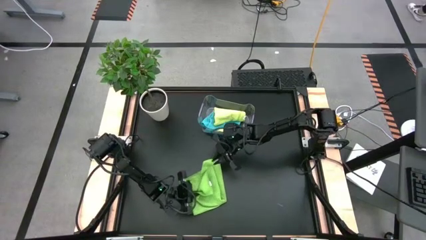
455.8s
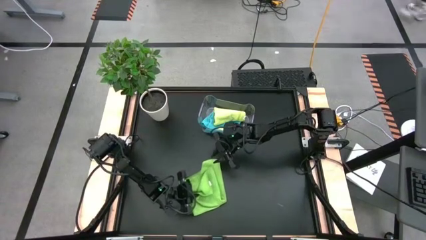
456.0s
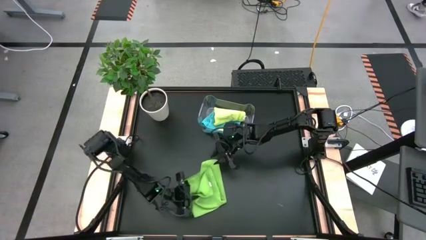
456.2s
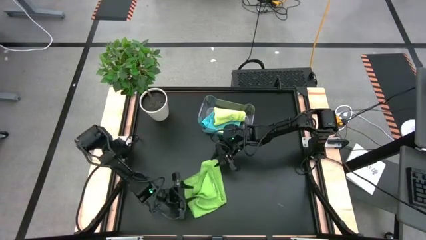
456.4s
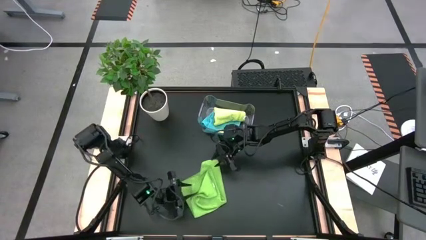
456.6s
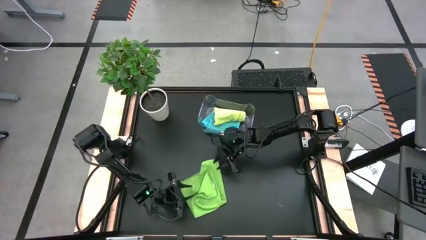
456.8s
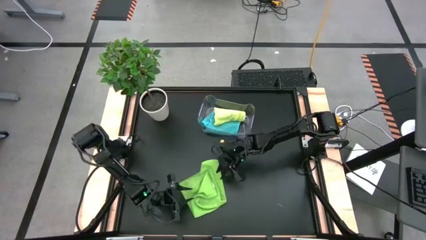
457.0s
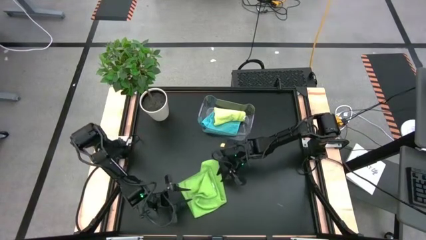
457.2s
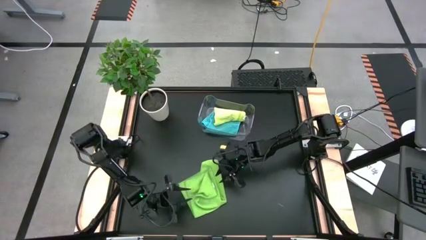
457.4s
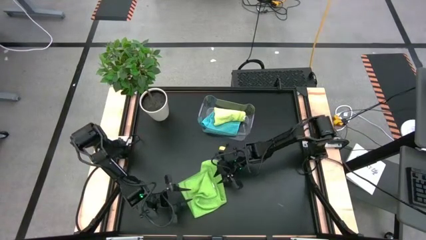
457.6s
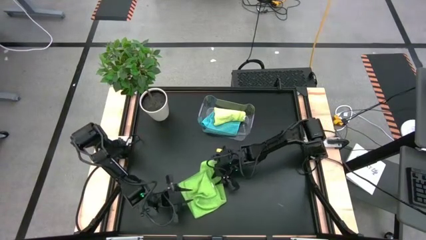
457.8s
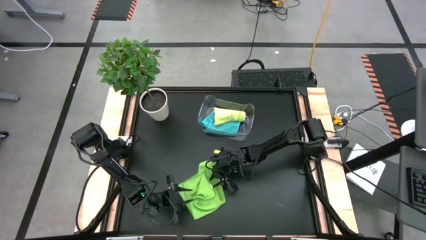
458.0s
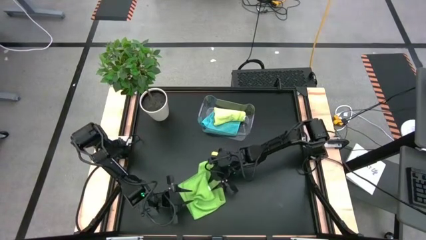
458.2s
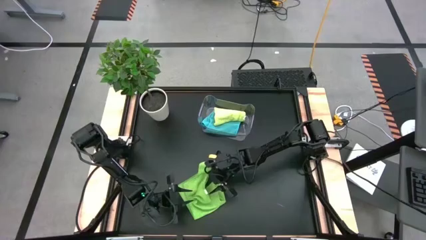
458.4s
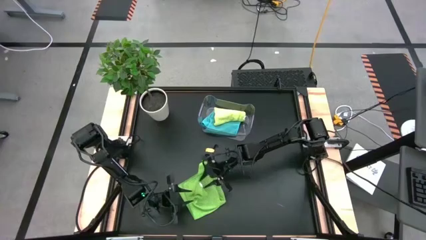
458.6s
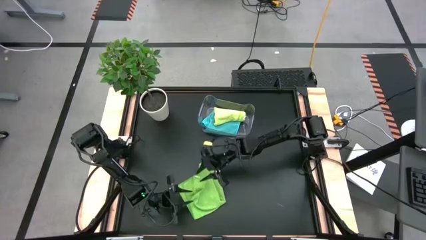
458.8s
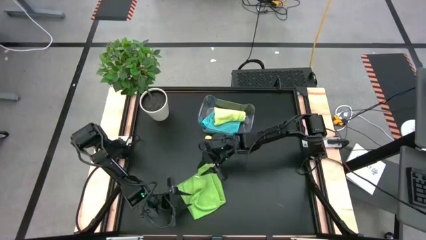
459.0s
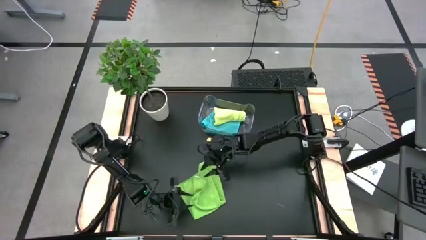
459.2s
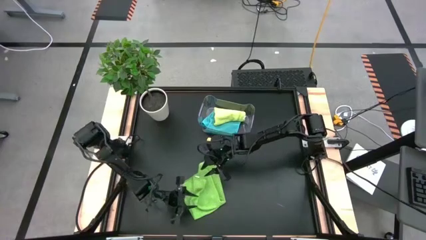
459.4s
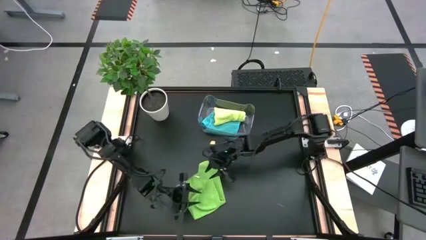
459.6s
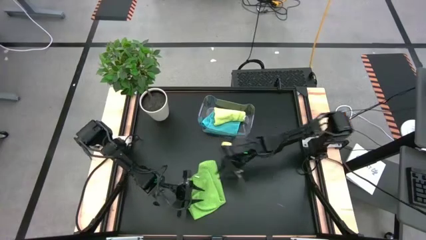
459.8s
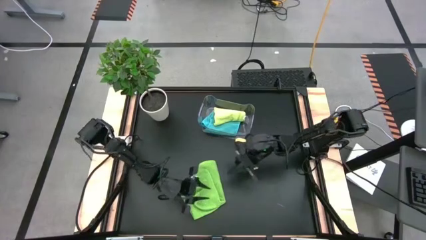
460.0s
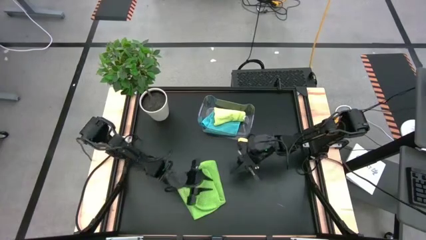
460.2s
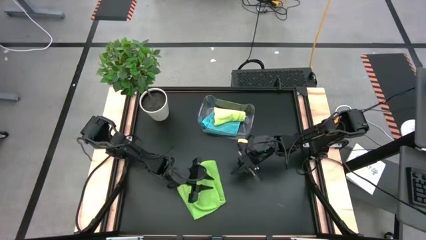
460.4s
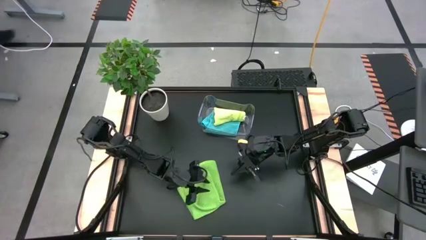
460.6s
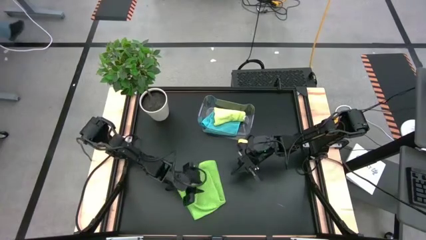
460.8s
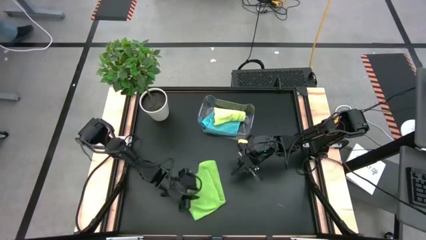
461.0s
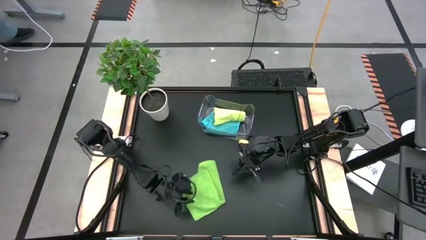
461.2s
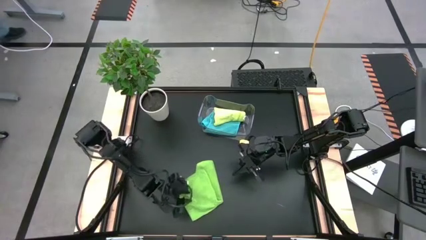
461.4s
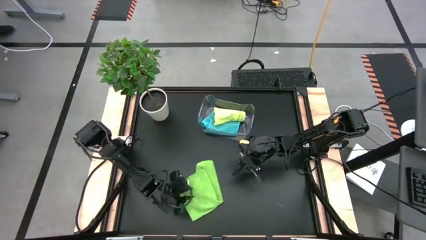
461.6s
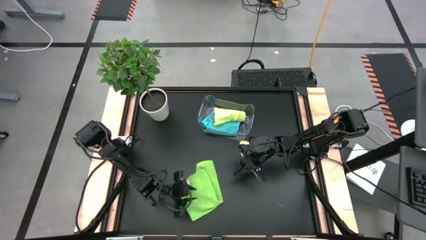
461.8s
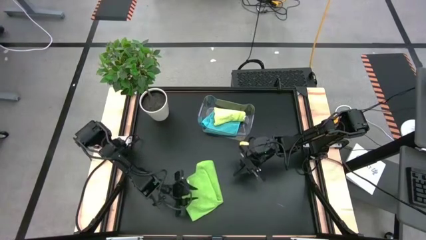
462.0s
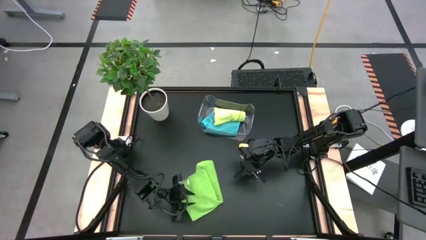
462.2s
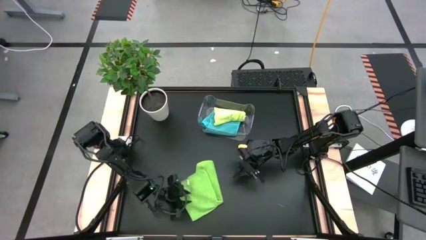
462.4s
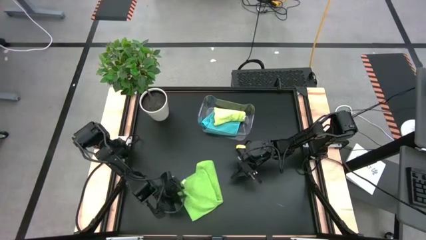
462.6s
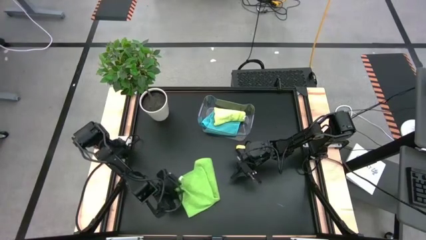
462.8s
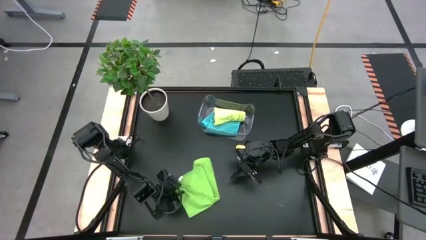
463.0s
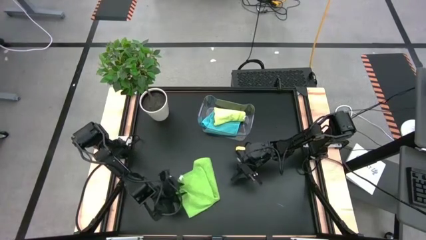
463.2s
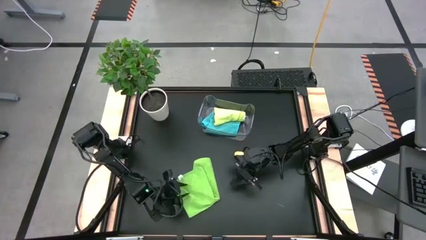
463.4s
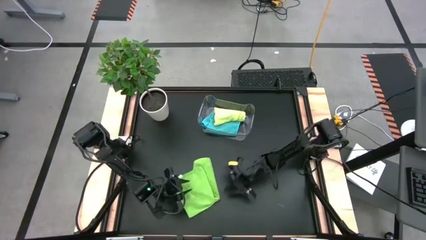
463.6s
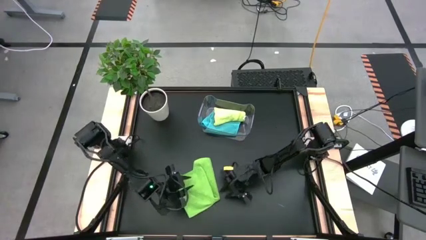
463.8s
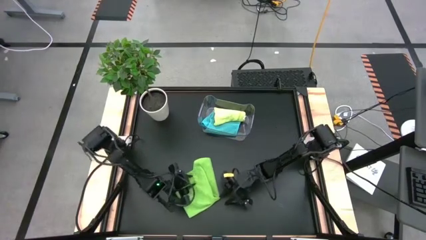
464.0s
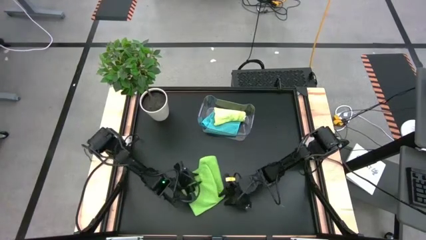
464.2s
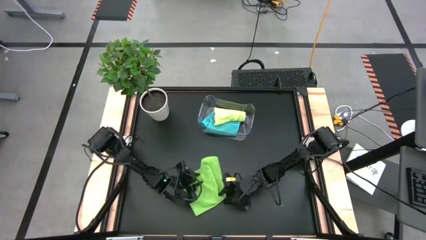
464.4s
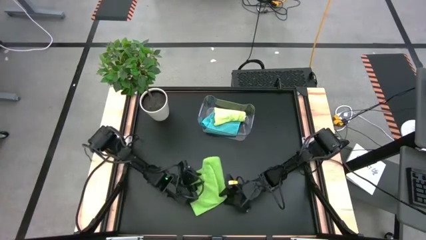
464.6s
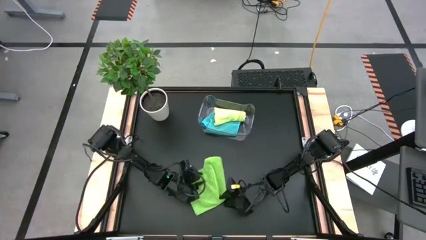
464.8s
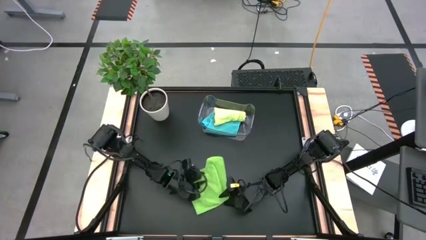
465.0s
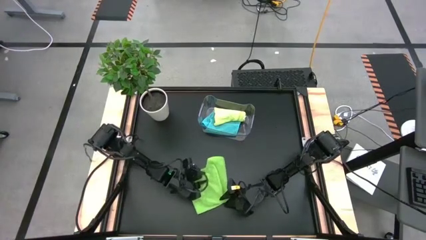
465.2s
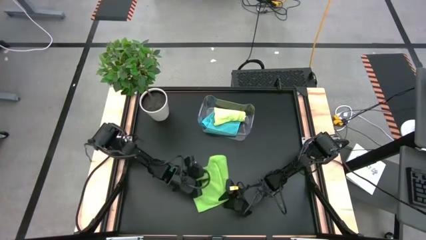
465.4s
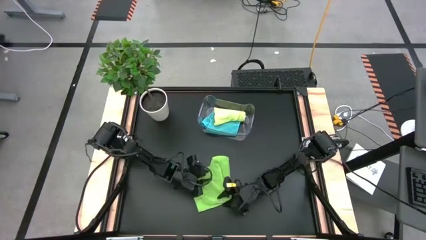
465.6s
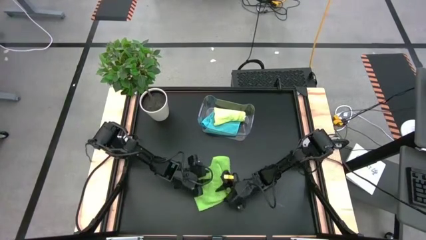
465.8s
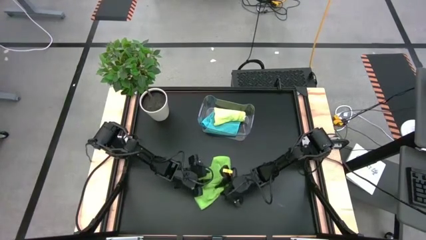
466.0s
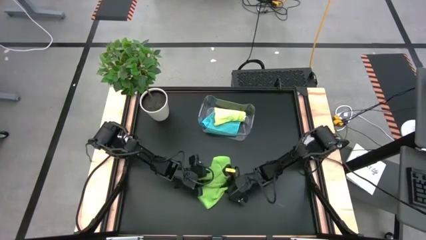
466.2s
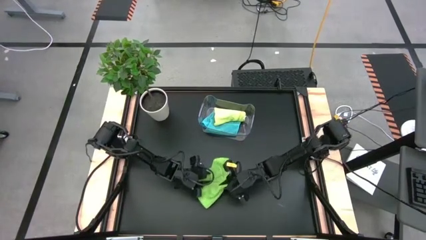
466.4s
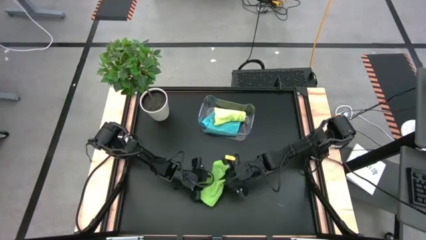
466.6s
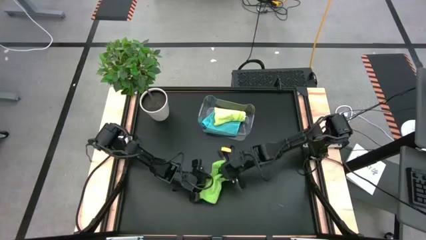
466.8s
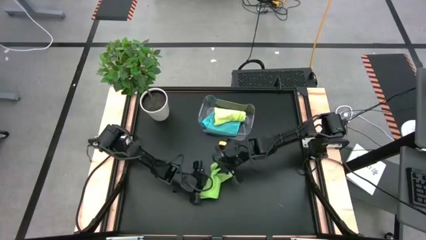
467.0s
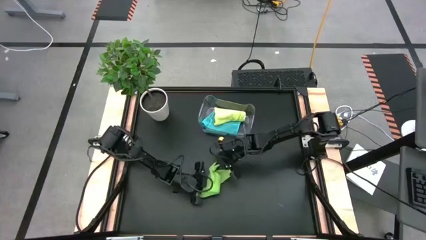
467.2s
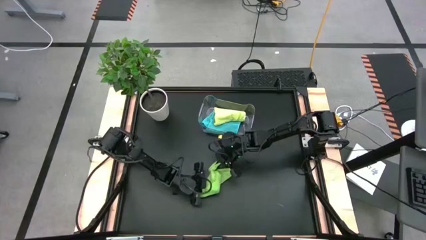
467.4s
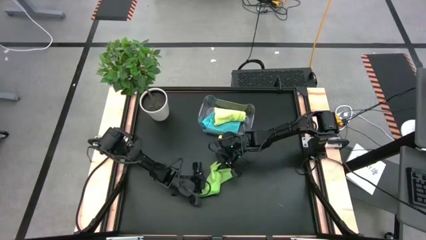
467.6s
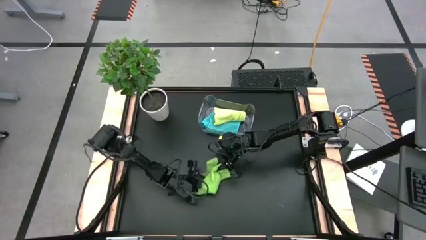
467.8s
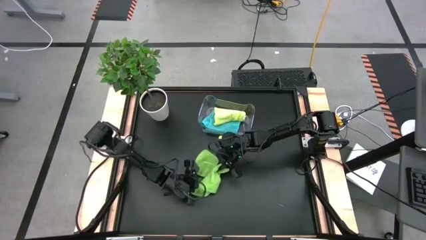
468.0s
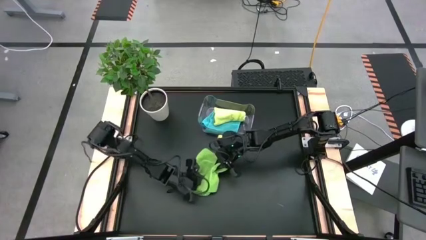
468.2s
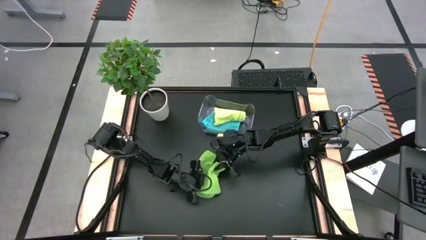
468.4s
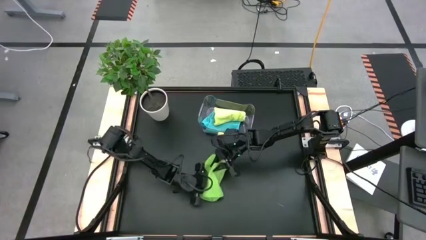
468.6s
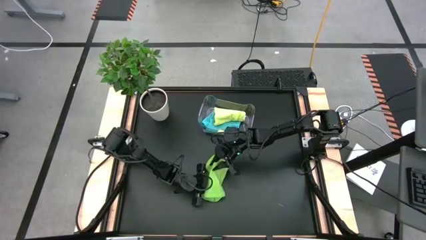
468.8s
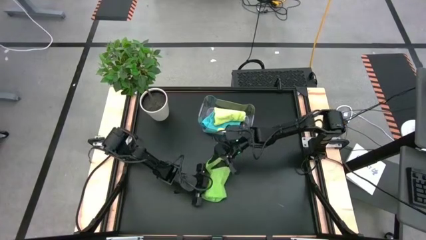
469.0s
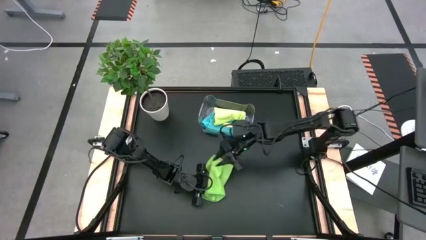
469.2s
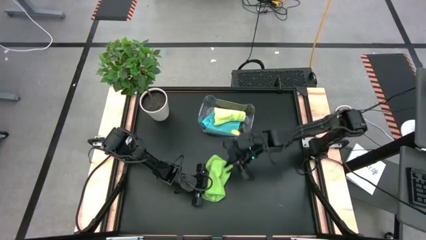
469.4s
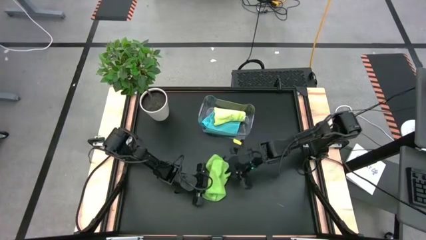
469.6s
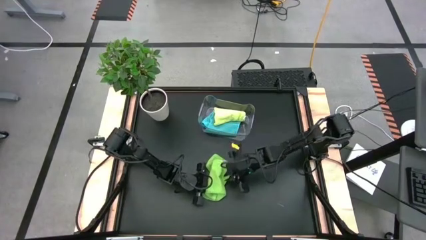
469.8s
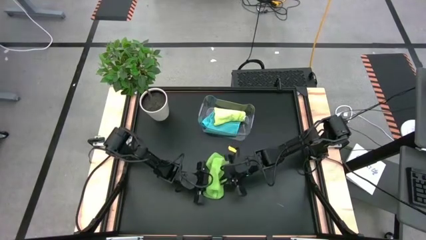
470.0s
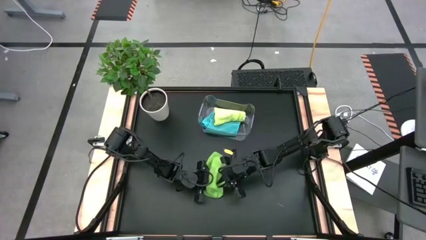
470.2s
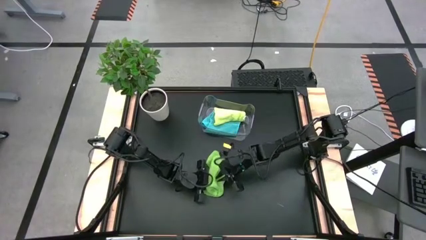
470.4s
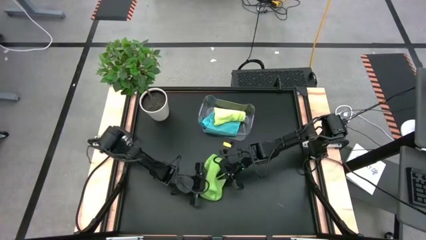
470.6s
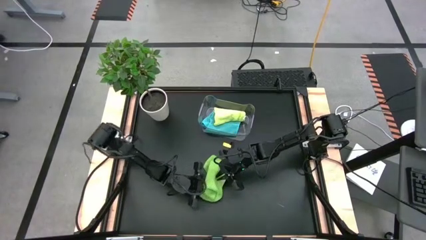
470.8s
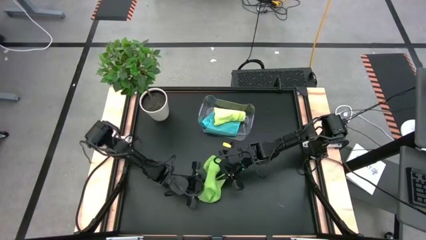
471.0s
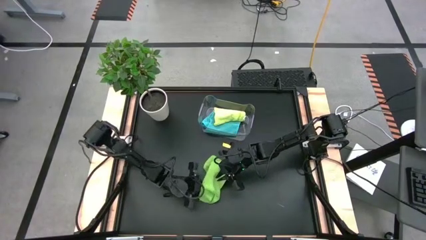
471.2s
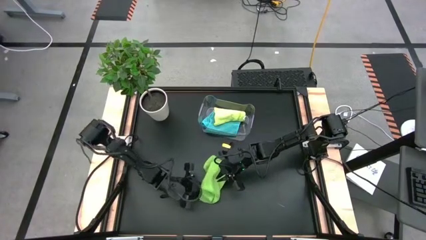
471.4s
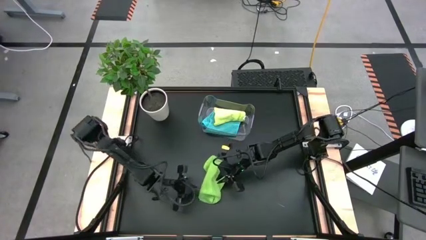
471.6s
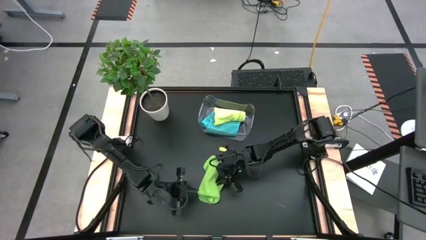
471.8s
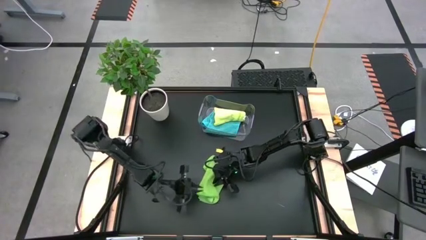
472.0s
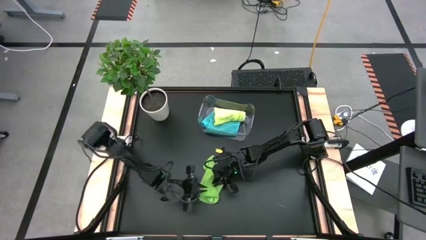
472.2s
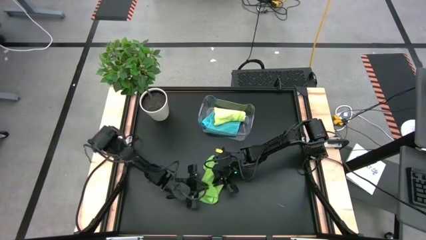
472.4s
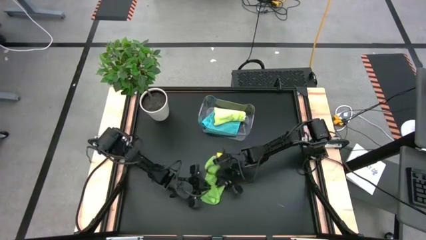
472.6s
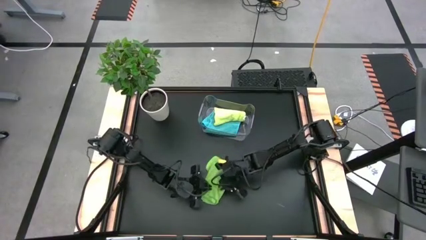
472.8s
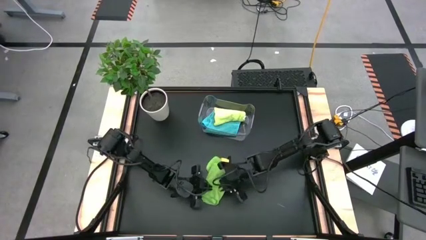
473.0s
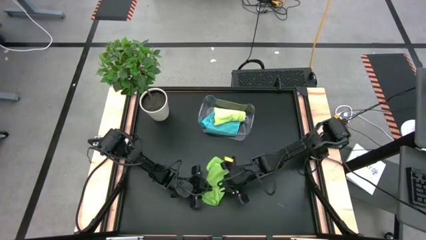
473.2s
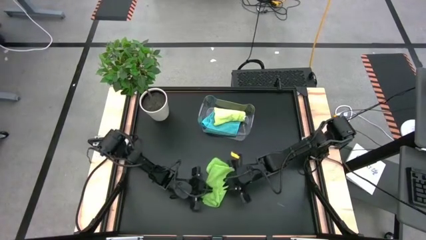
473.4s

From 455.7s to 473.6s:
Task: Fold microfiber towels
Fold the green towel
